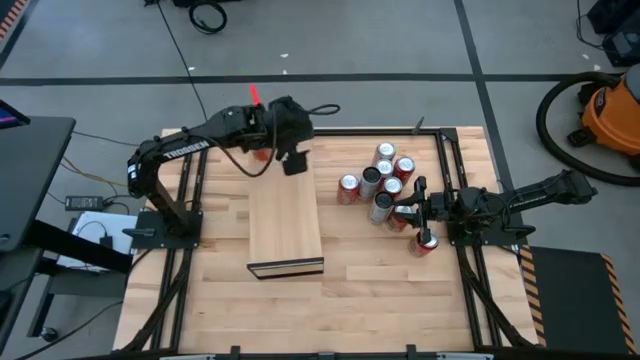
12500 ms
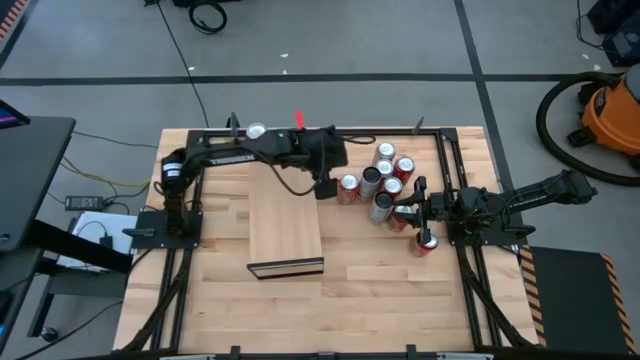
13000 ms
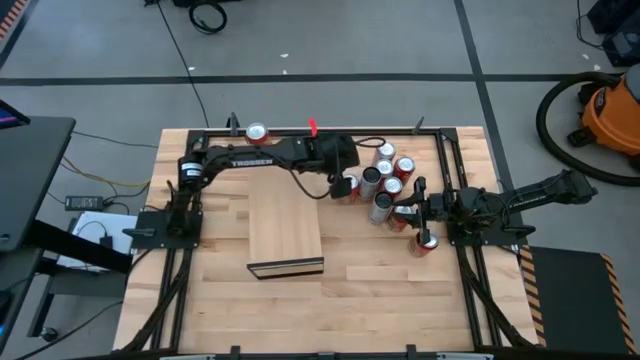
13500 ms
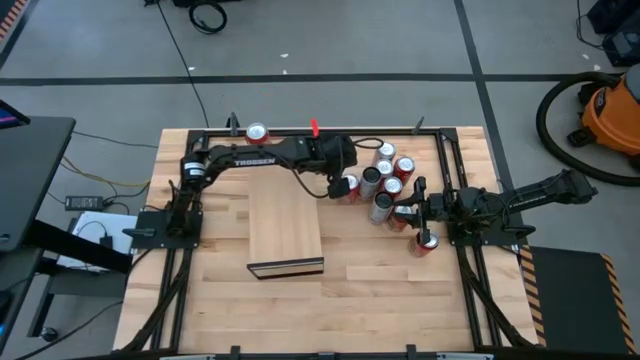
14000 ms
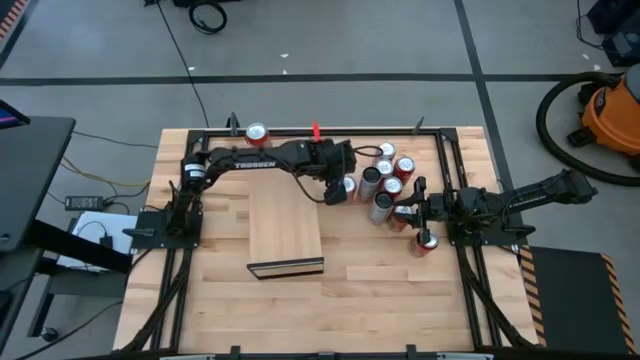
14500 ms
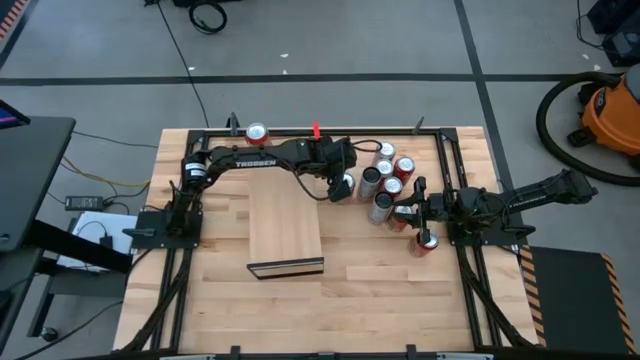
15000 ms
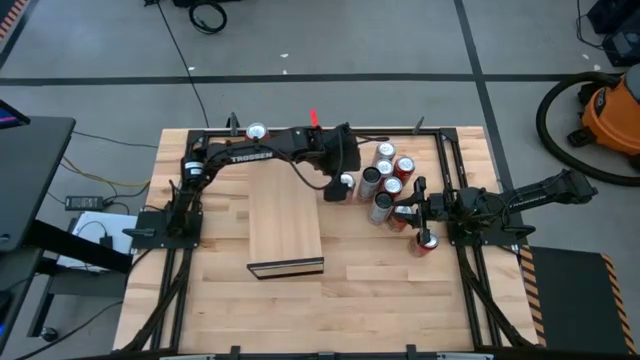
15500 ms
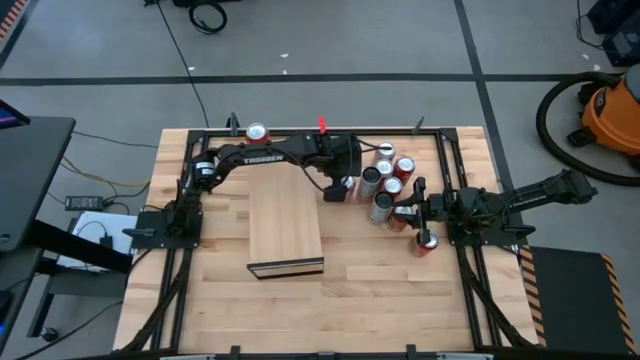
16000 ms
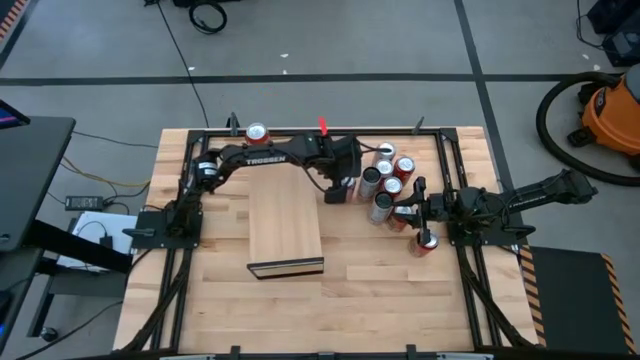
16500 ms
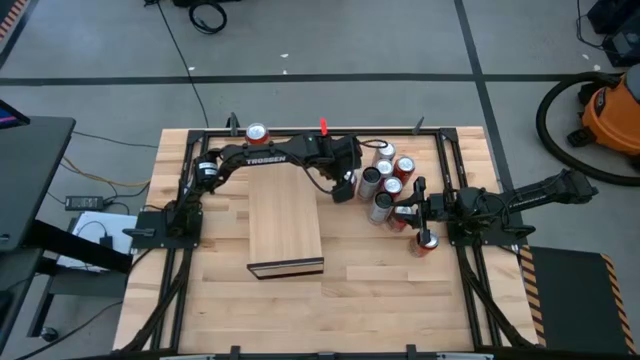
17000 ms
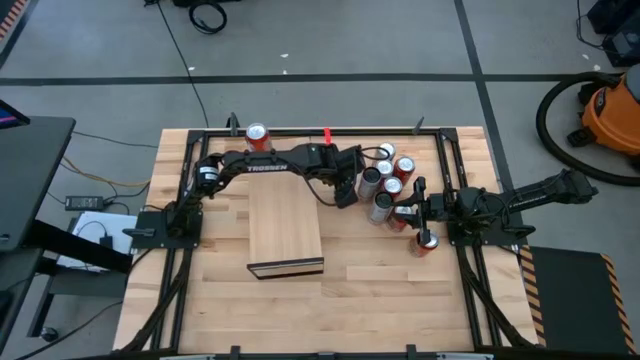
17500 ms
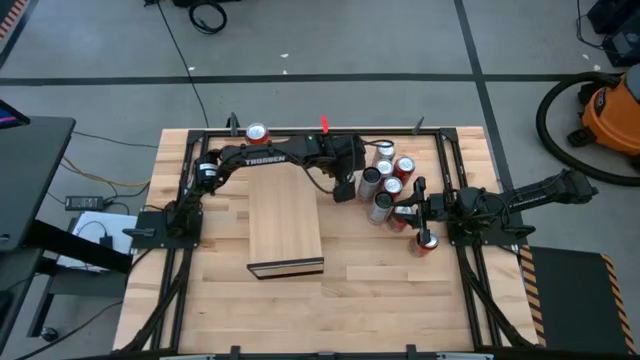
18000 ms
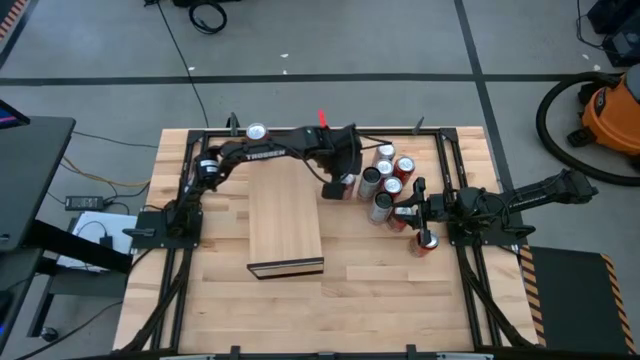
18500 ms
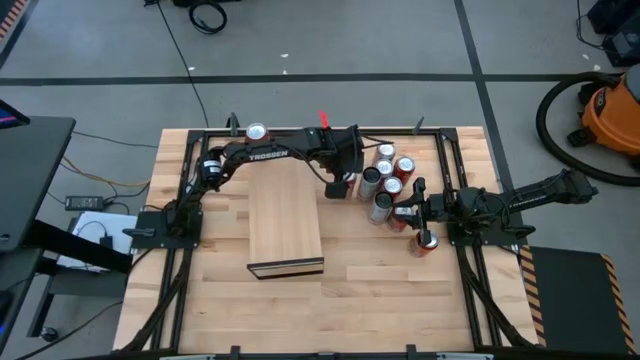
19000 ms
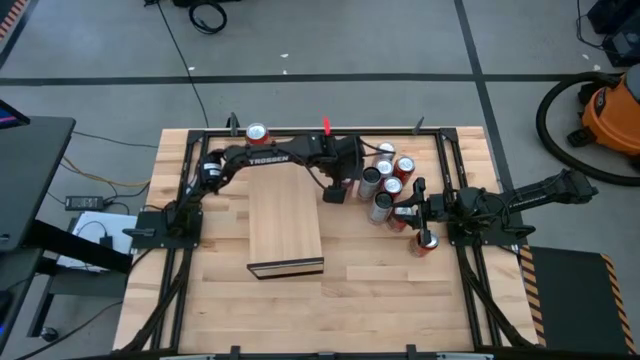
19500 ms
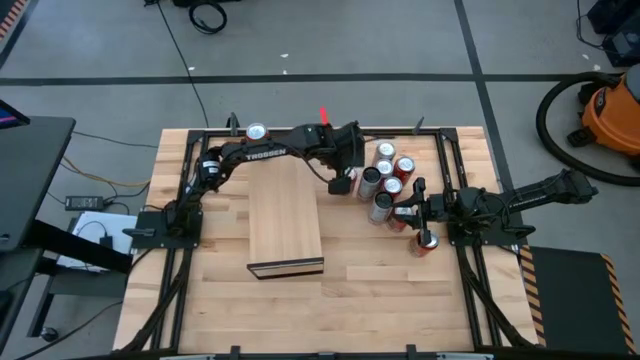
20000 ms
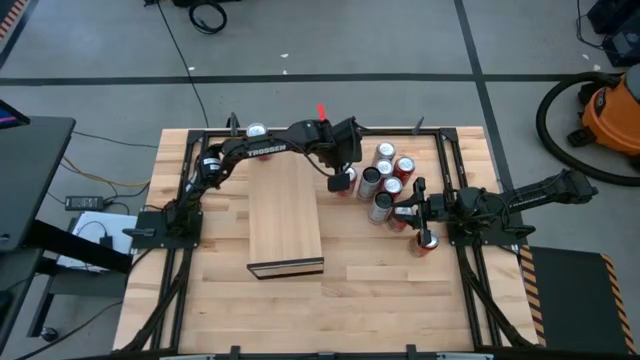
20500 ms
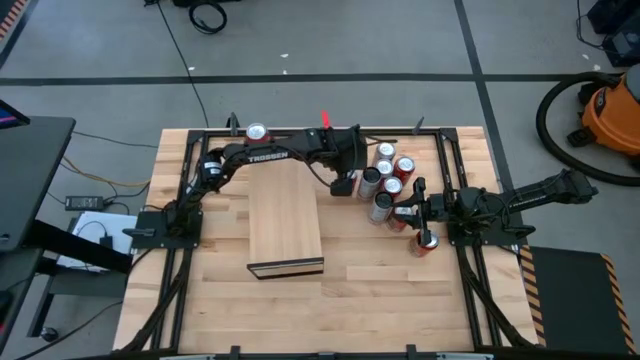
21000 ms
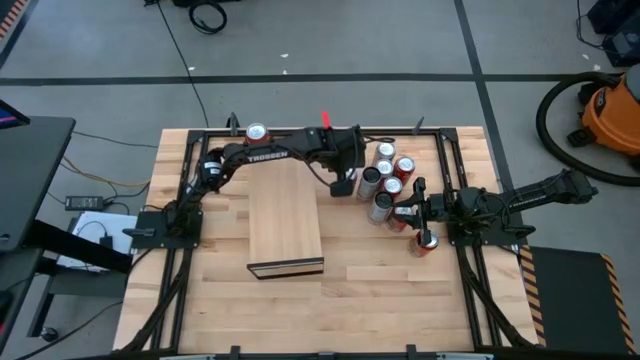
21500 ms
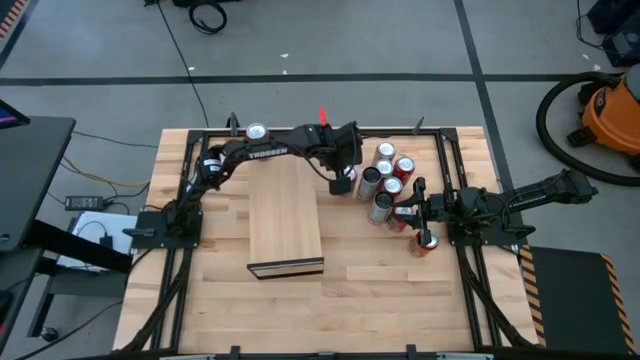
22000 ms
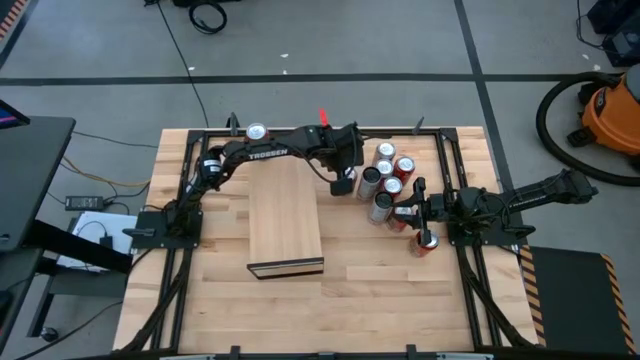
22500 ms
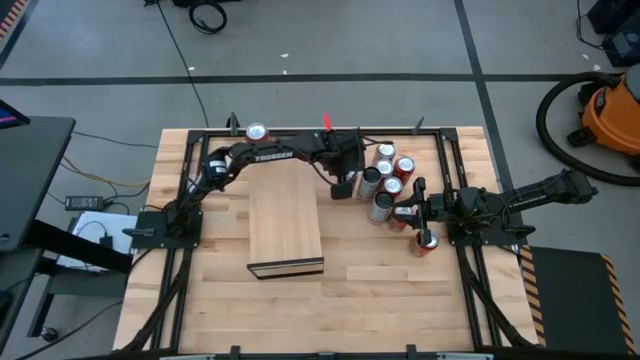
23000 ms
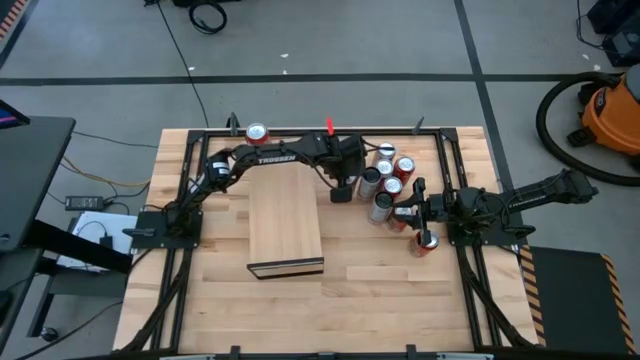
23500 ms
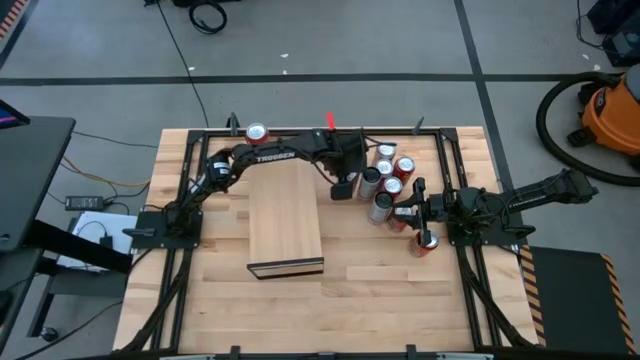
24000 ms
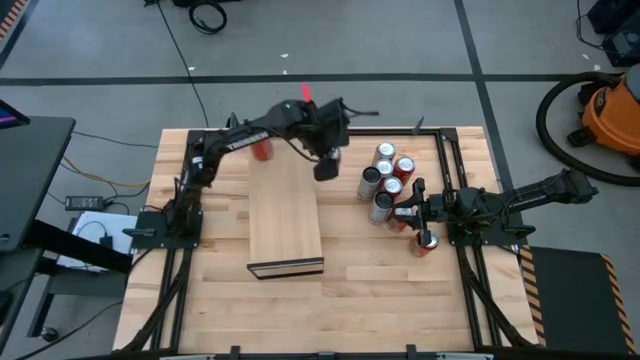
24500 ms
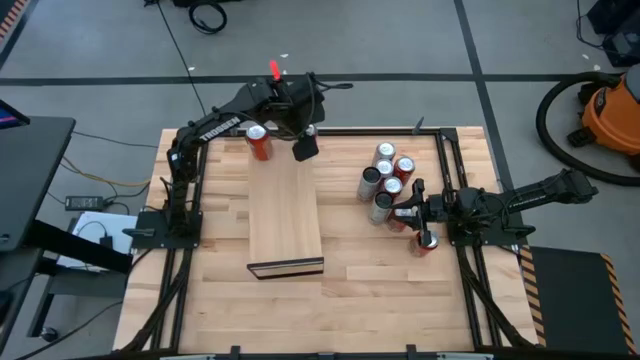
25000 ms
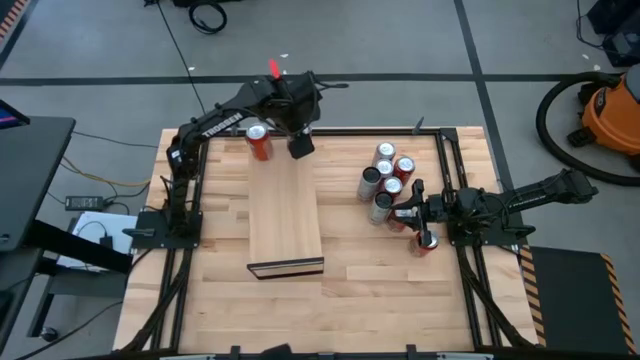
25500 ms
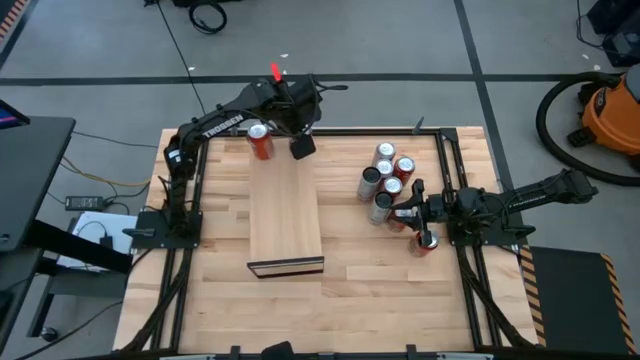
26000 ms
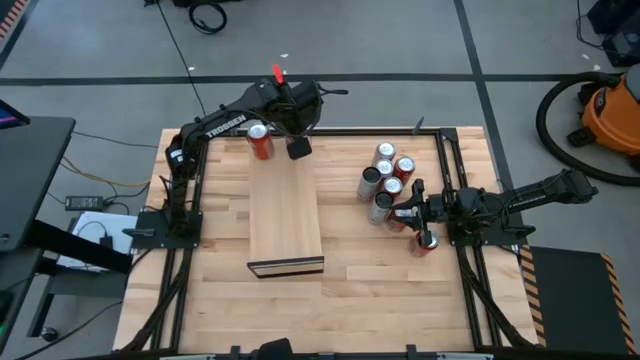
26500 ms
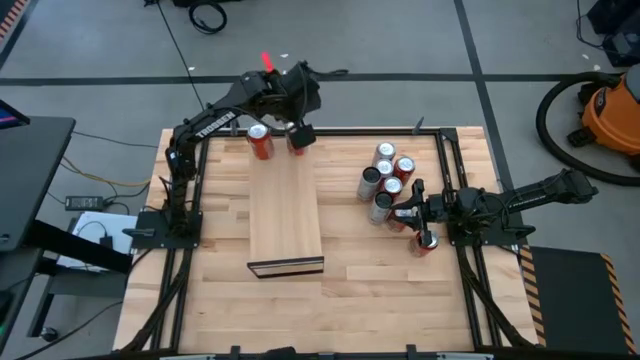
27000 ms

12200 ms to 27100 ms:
Task: Place canned beverage on shelf
Align the orange soda can with the other orange soda can on the shelf

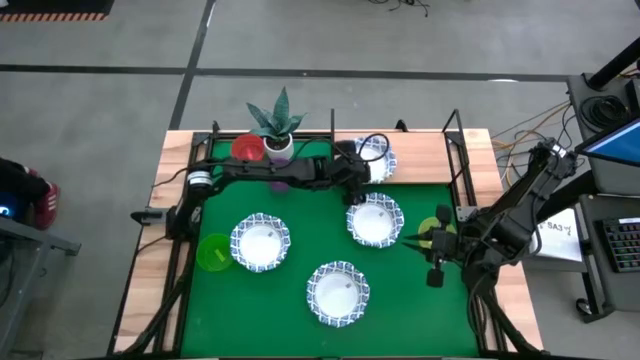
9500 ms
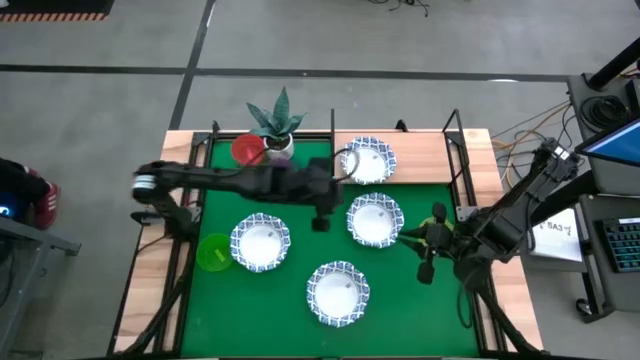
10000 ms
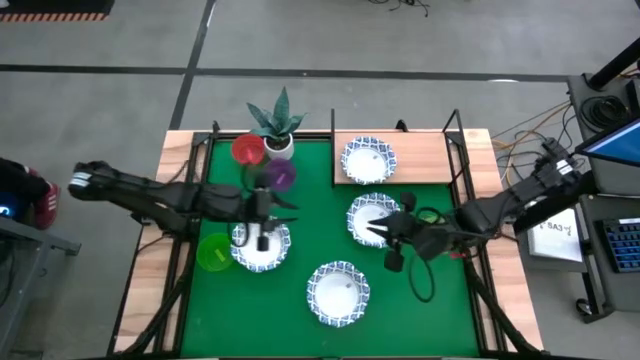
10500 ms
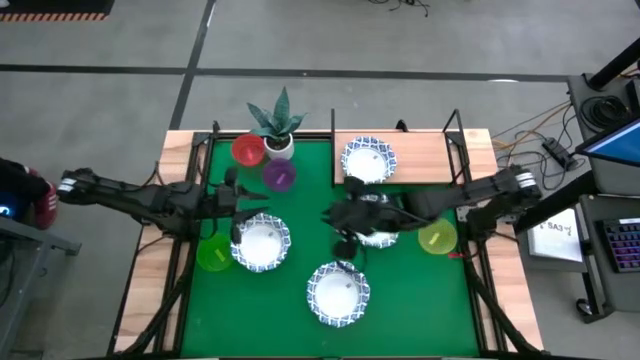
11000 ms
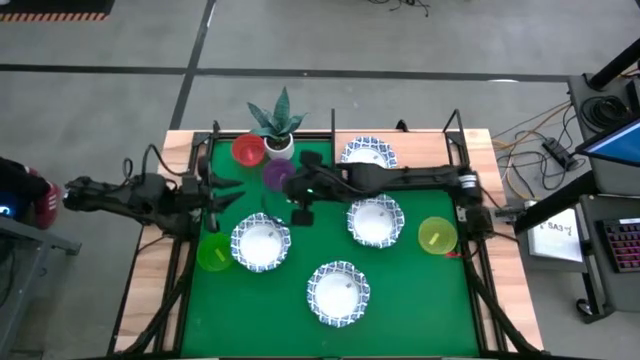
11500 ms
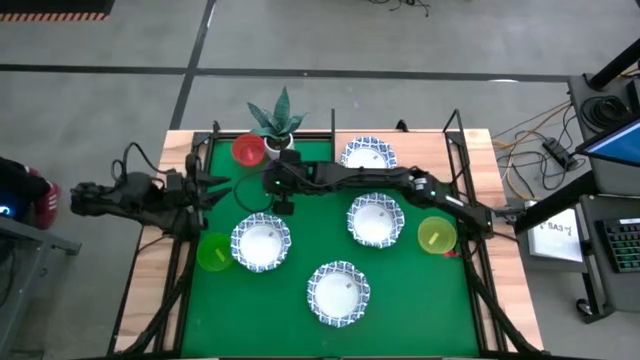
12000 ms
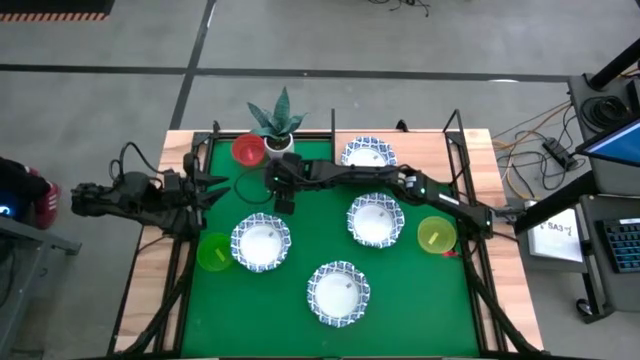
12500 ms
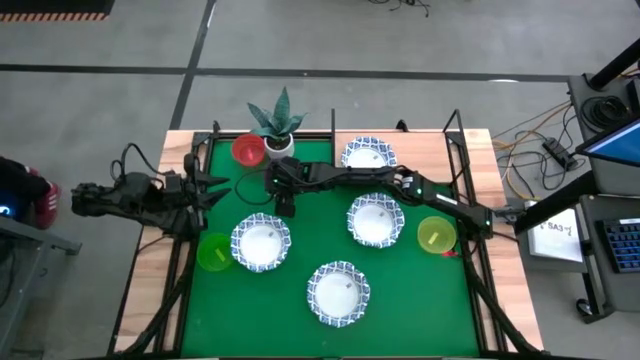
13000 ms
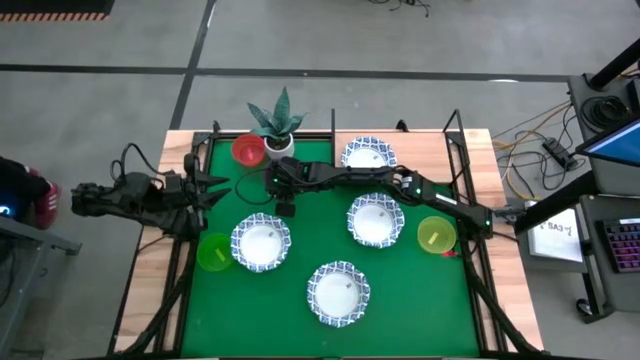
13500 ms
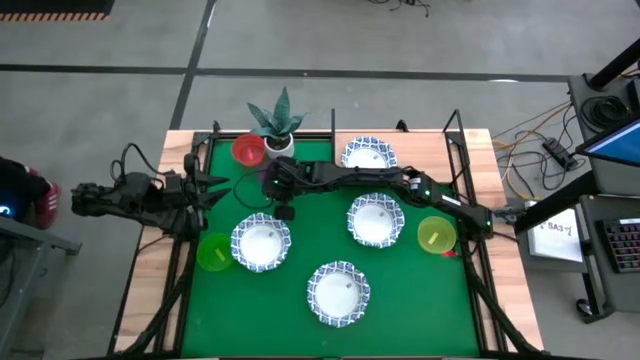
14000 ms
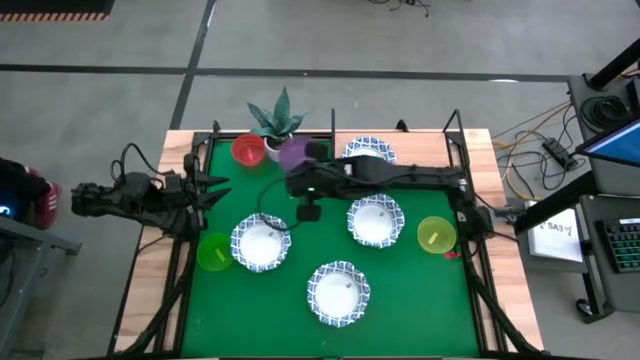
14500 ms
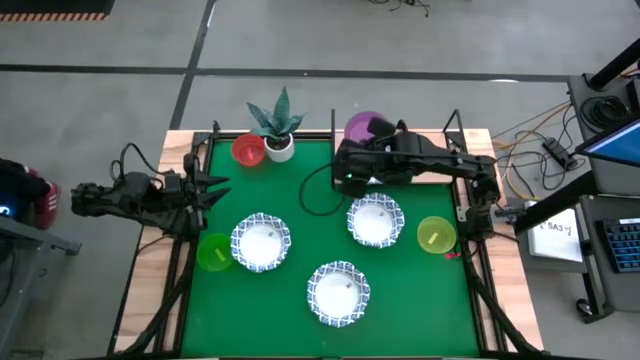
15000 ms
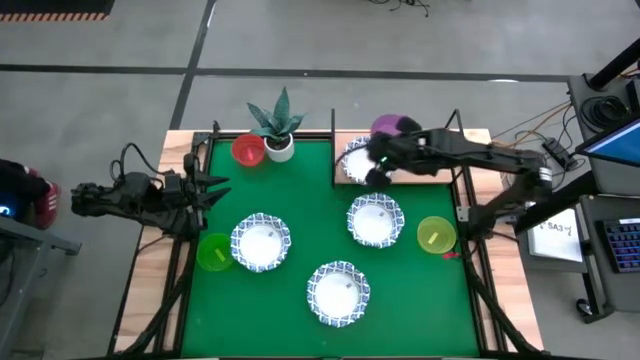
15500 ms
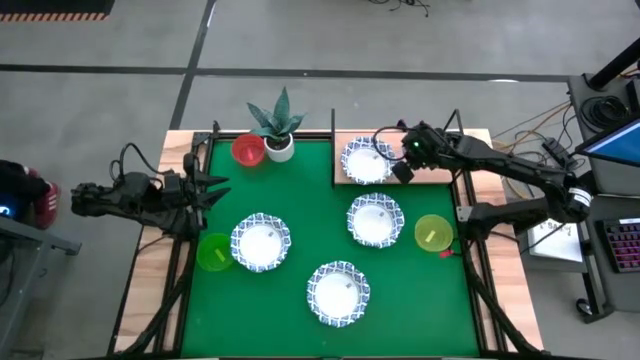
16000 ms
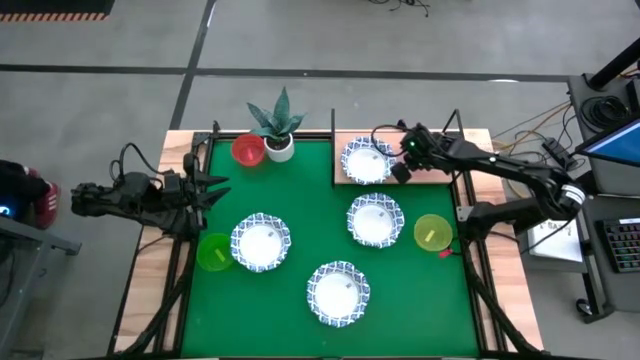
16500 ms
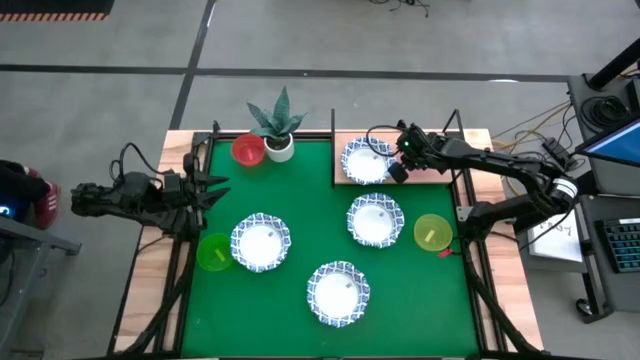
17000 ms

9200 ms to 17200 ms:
Task: Place and stack bowls onto a shelf
Put the purple bowl on the shelf
